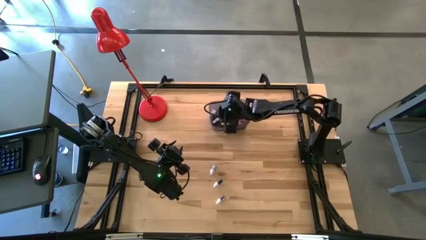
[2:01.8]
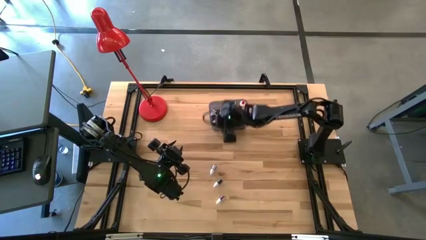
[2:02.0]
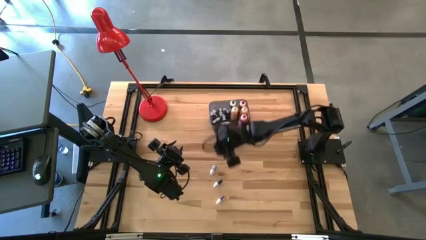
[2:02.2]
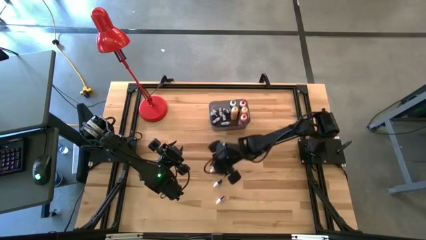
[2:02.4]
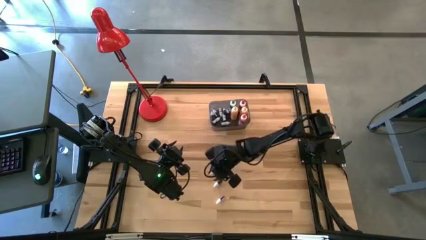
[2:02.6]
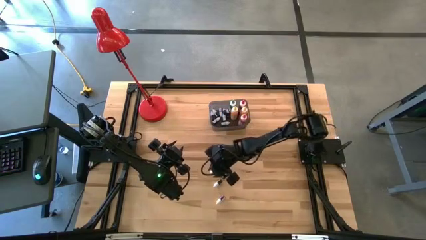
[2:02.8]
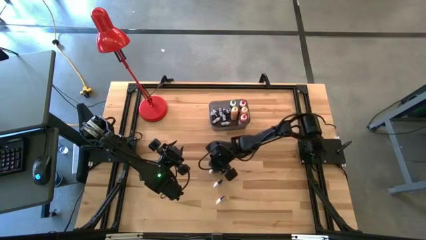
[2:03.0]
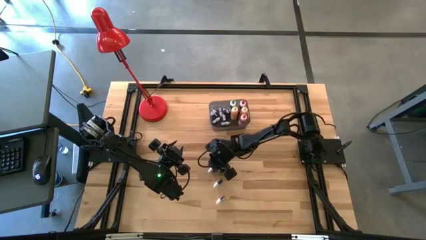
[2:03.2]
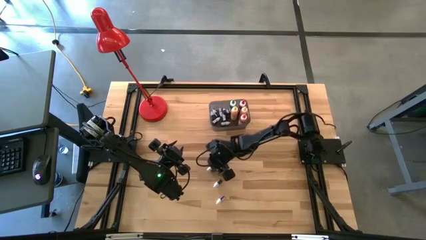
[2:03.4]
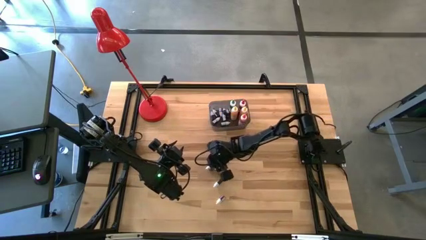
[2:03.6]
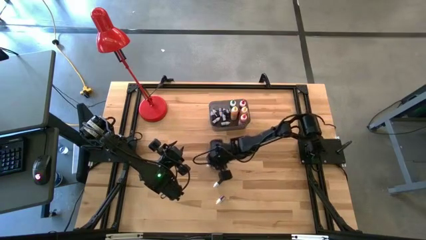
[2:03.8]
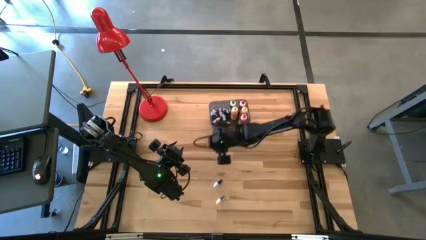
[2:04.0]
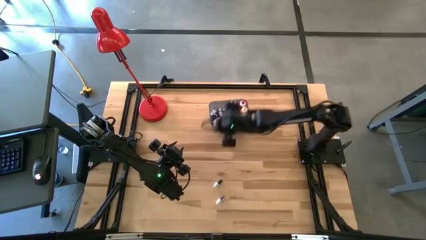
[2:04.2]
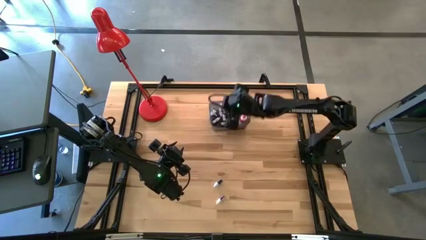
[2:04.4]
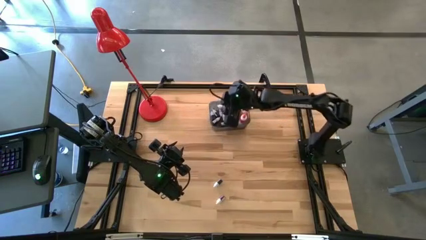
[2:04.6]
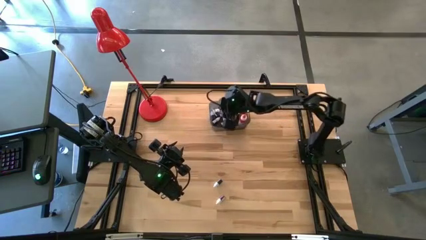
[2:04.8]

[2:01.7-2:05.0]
Task: Pick & Place food coloring
Put the small black food coloring bottle into the black bin

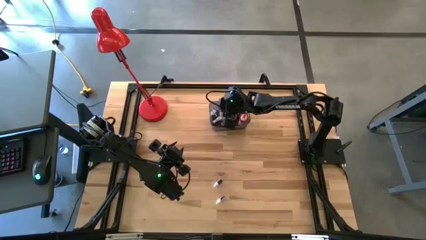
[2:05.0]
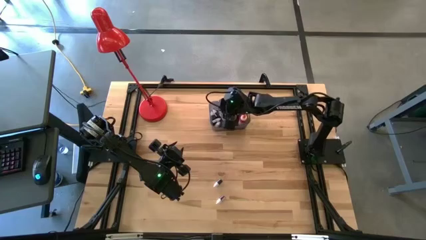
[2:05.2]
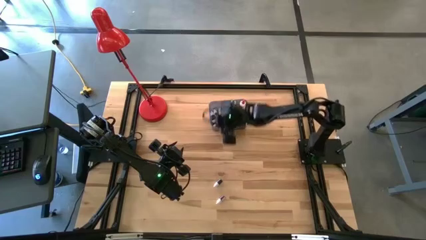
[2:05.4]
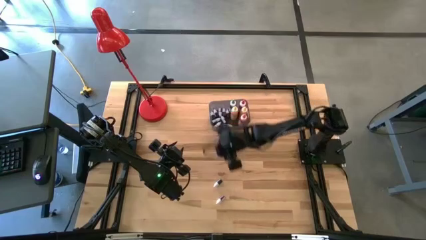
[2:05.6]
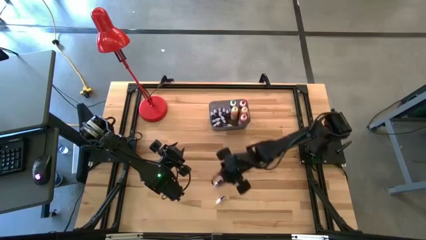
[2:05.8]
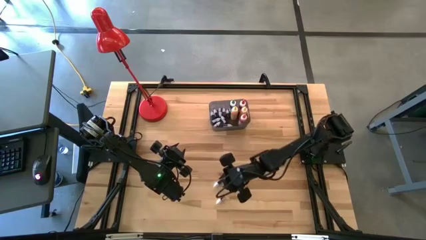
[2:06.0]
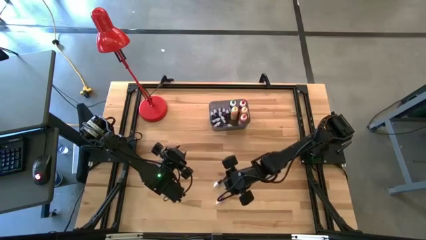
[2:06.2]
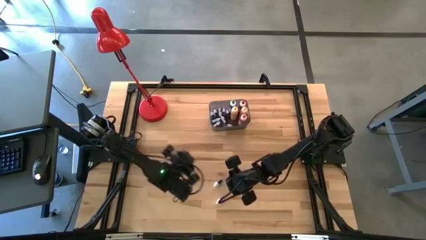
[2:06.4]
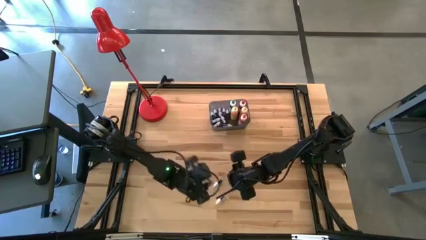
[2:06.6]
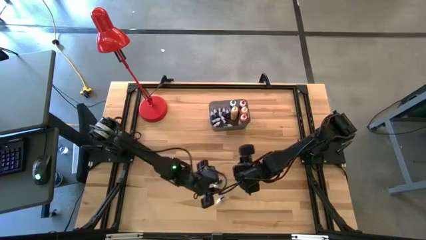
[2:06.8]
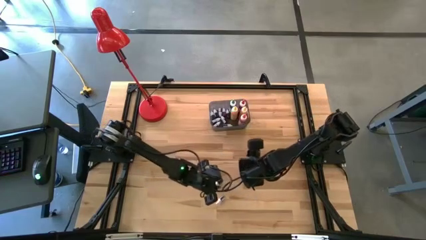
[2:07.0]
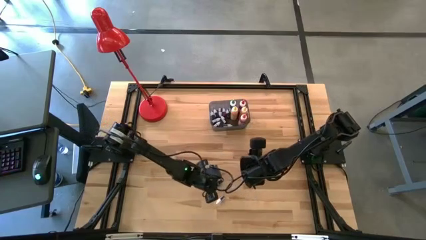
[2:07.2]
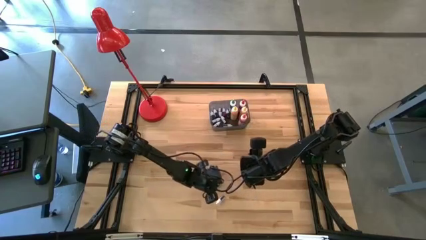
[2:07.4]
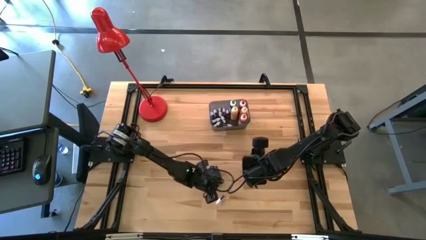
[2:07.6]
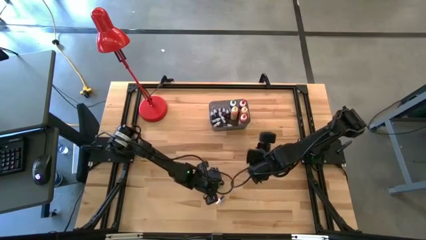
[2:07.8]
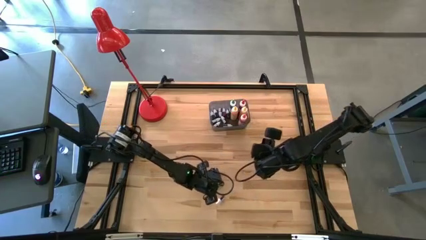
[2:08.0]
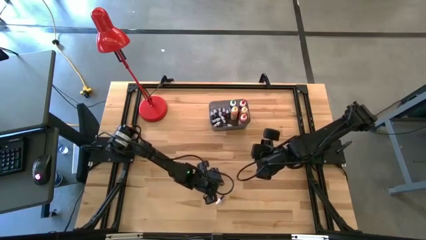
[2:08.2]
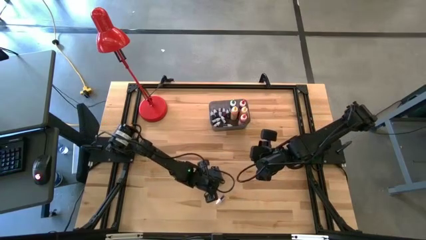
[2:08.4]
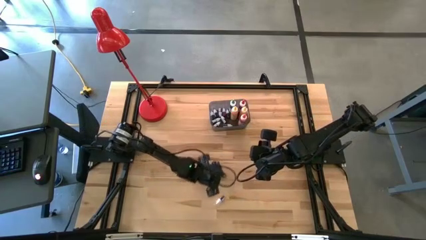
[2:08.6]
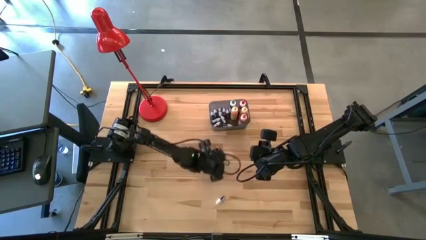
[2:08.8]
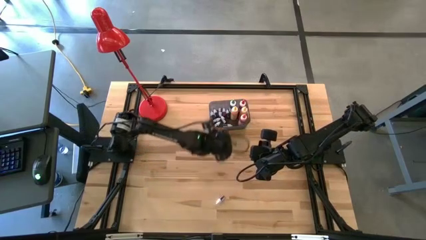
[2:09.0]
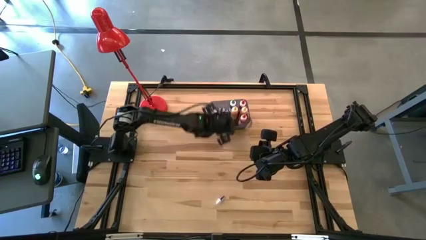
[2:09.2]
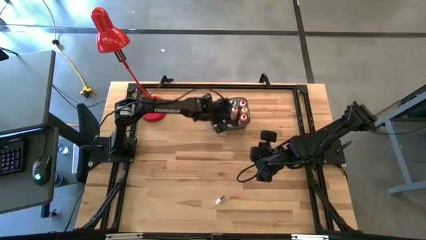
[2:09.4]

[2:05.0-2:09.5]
Put the small green food coloring bottle into the black bin

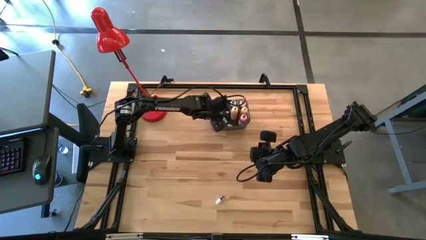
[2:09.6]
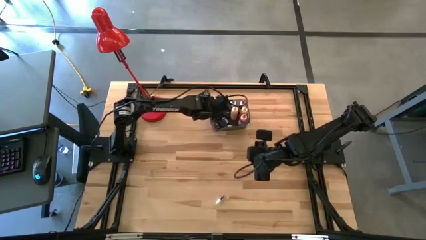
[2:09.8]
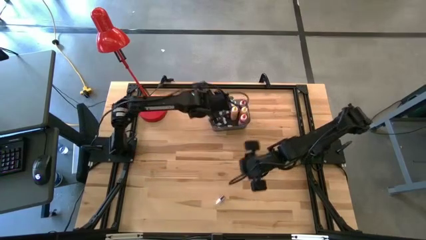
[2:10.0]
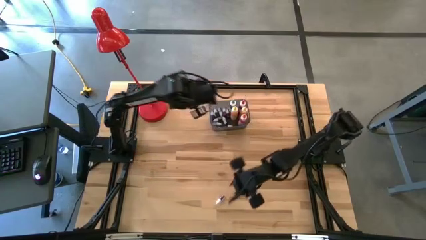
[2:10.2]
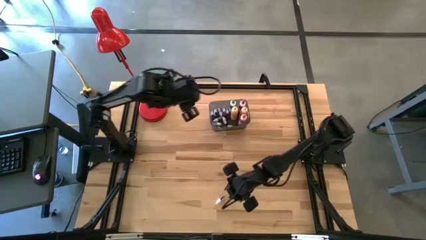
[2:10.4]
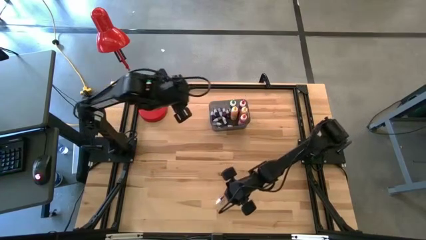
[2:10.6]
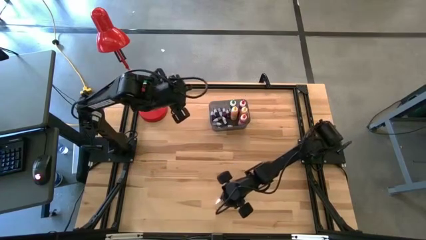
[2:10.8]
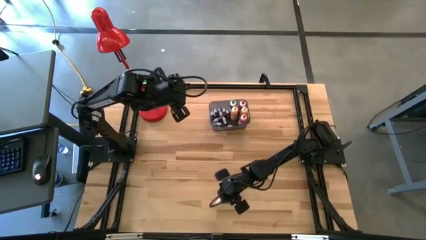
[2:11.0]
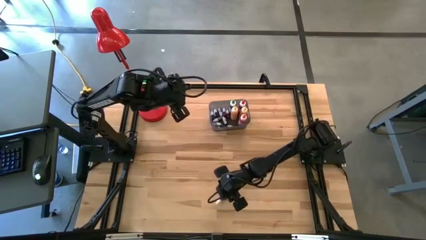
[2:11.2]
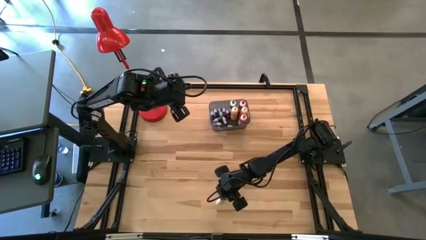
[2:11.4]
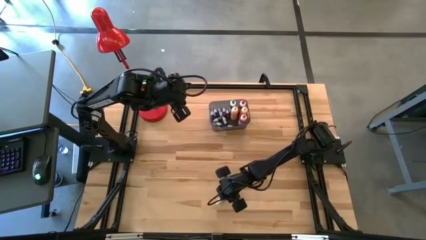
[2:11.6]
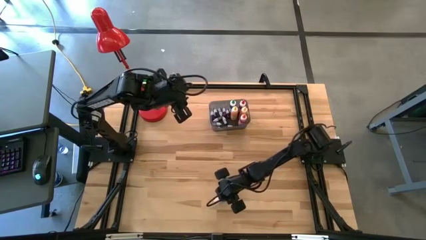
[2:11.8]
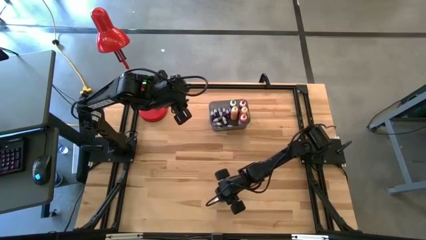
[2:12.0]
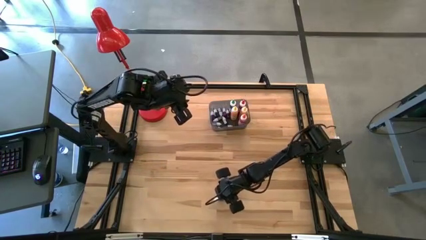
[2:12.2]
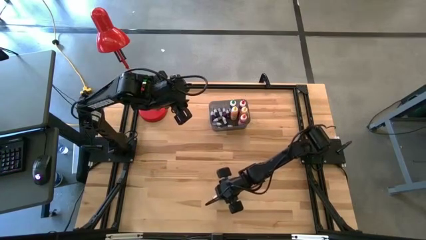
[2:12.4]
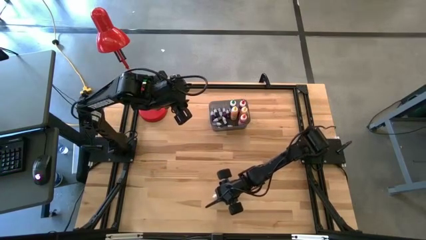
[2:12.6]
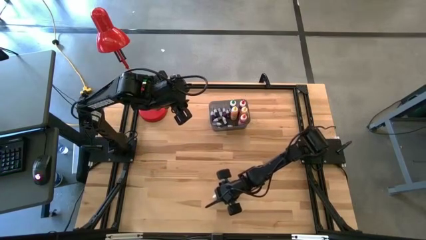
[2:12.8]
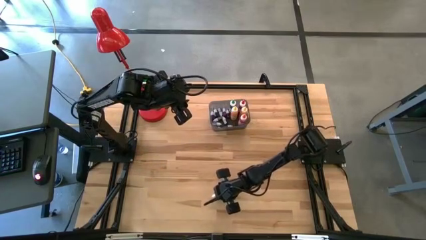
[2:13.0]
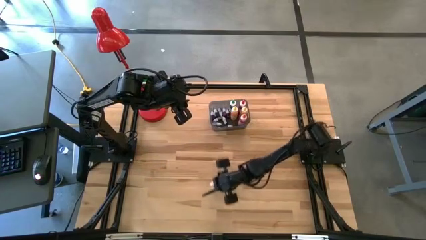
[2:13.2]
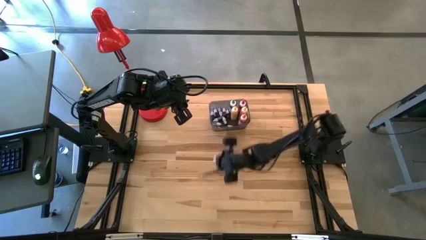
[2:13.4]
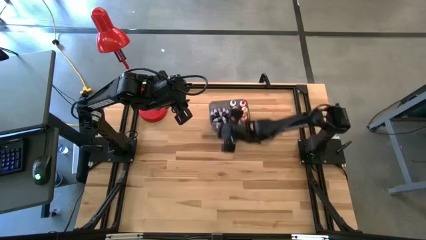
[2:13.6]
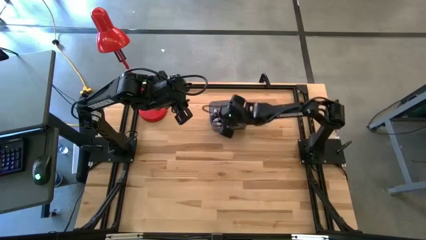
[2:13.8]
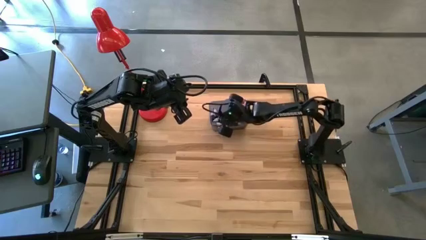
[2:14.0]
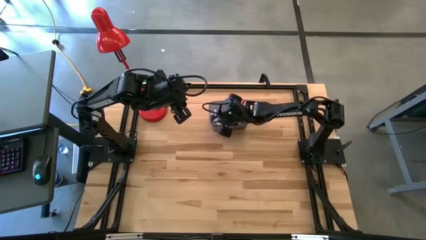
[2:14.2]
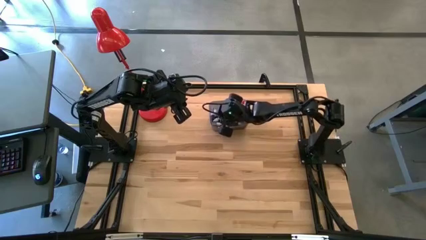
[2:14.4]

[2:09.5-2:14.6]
Put the small red food coloring bottle into the black bin

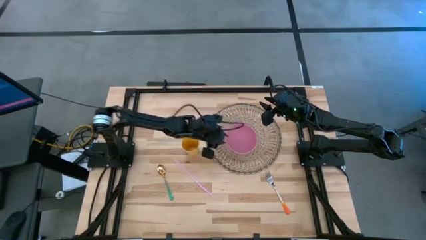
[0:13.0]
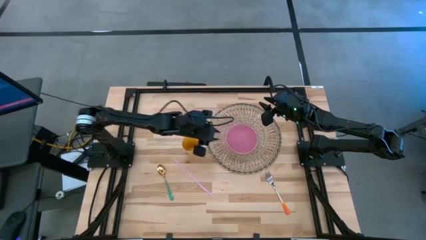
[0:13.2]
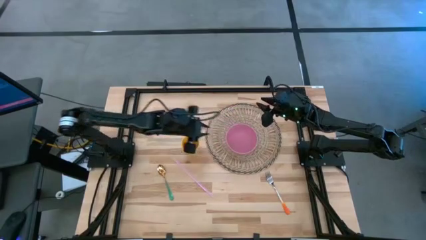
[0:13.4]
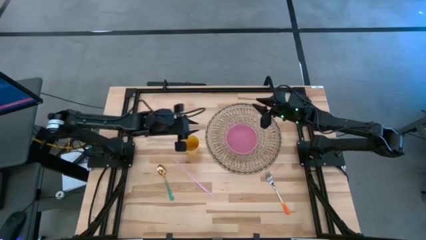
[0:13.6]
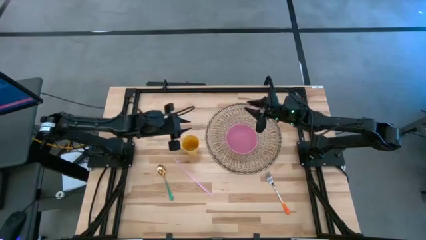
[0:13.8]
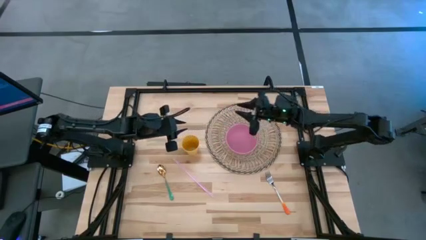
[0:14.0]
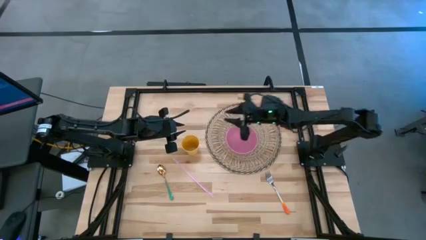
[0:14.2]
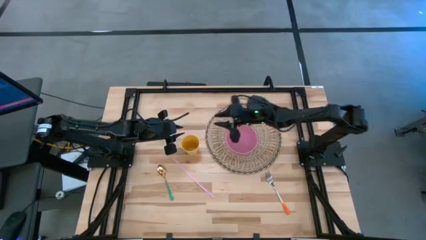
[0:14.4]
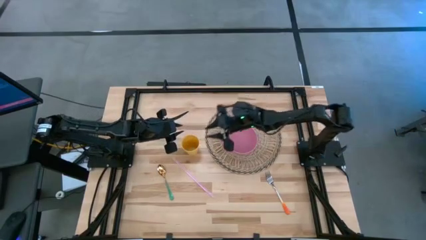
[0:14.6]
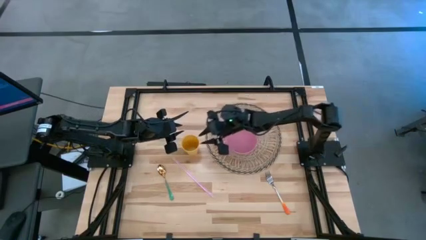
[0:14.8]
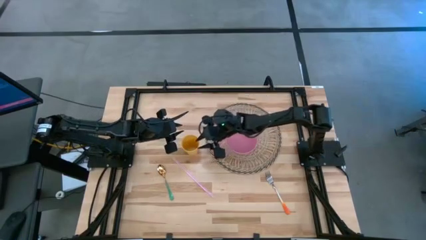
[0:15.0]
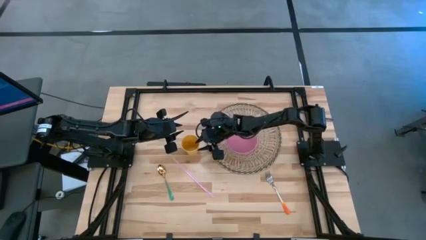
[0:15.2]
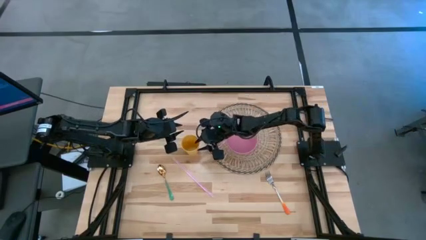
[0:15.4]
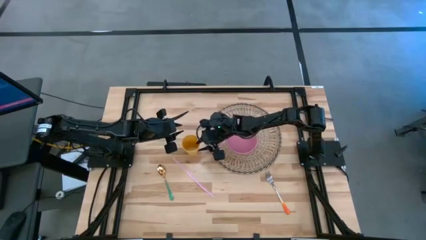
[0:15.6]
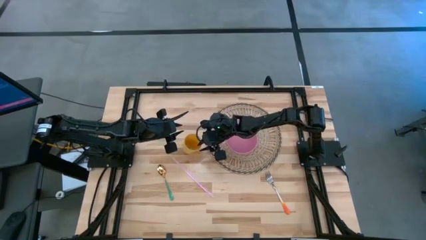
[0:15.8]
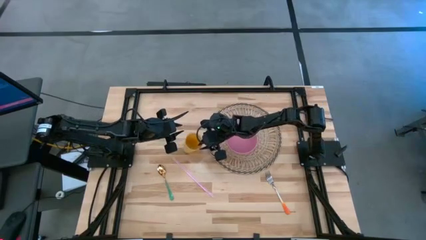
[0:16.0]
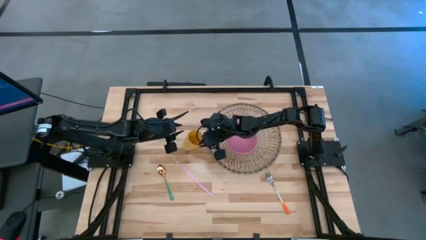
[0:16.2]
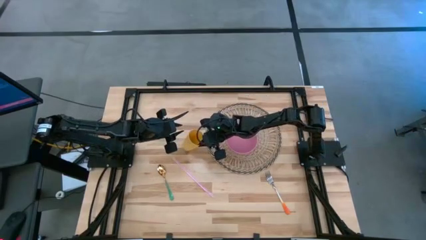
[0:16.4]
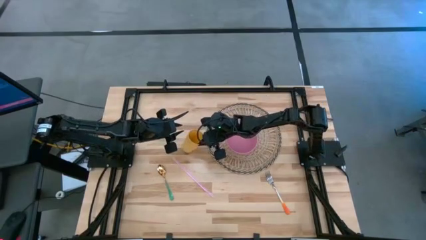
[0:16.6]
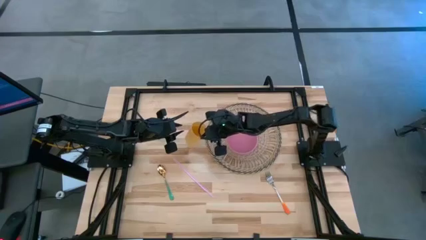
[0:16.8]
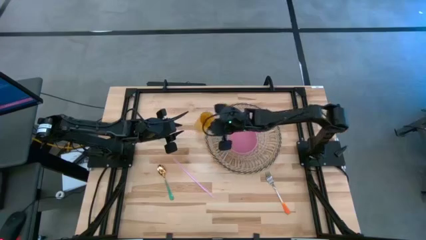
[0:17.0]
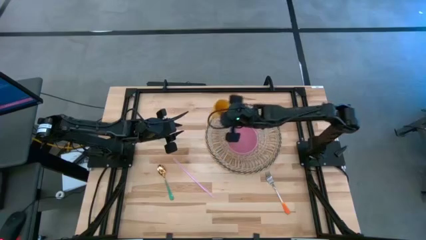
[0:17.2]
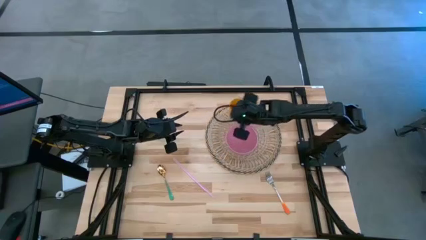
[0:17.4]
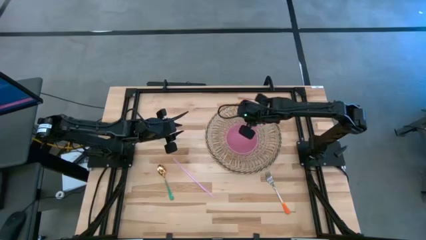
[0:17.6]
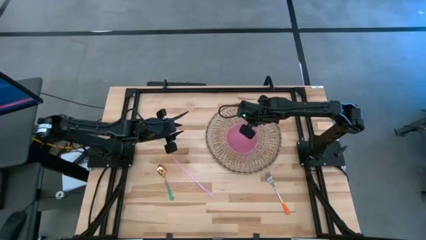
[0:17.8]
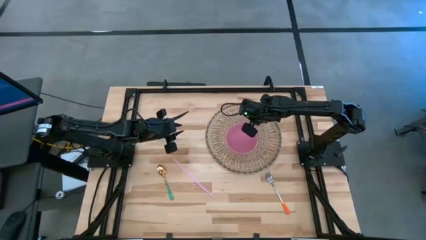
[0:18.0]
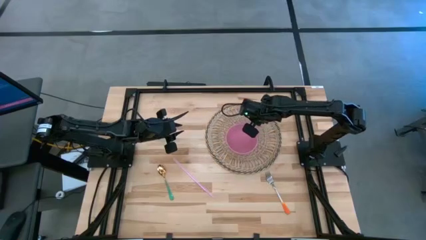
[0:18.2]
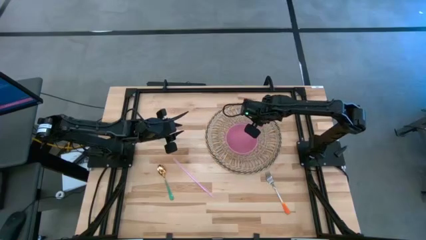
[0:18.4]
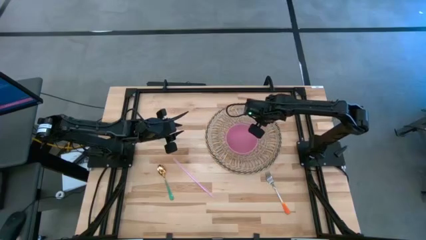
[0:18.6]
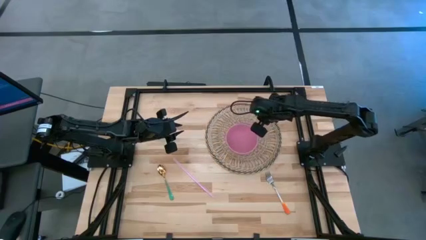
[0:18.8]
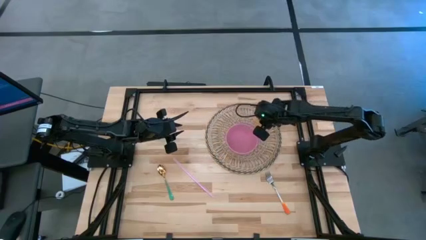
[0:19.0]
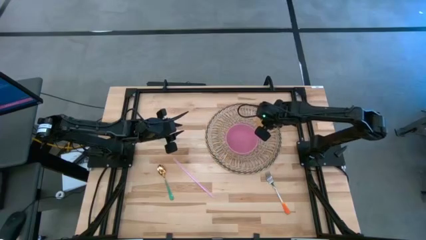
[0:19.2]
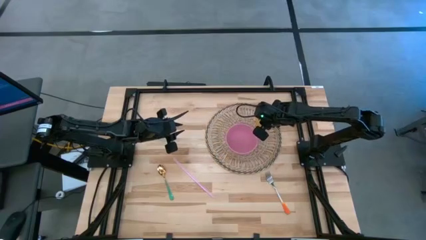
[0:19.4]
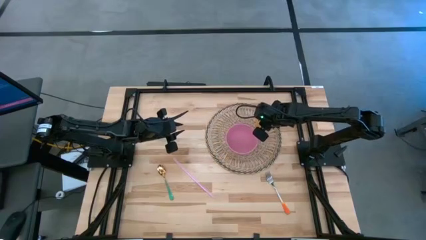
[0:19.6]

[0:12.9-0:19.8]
Task: Pick & Place Utensil
Put the yellow cup on the brown mat to the top right of the pink bowl
